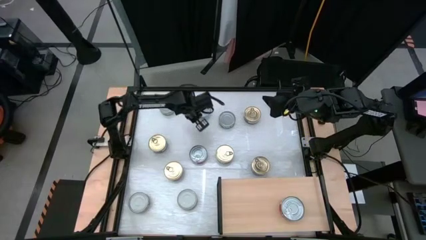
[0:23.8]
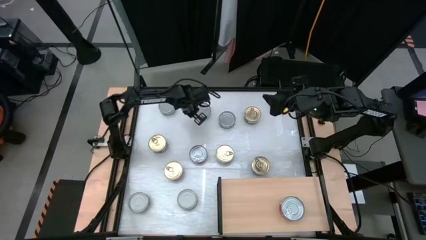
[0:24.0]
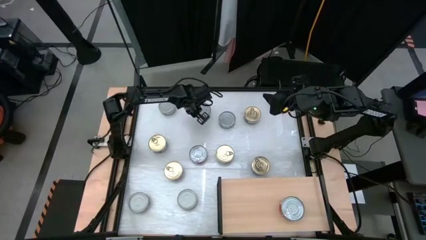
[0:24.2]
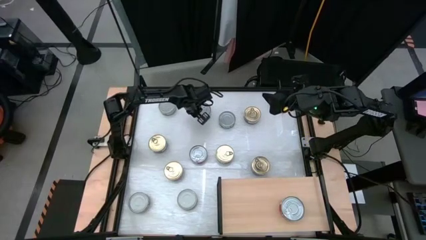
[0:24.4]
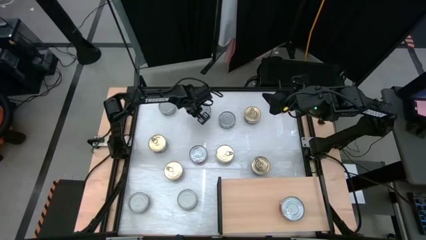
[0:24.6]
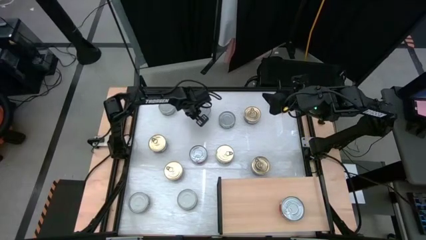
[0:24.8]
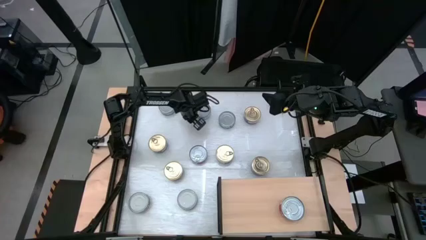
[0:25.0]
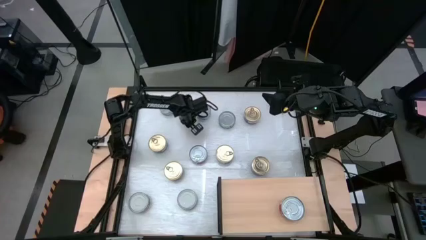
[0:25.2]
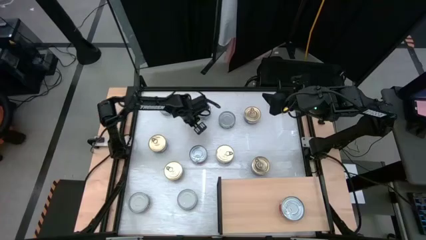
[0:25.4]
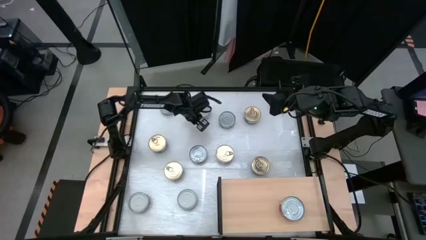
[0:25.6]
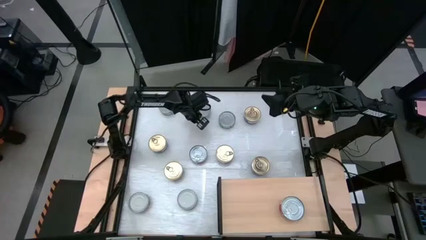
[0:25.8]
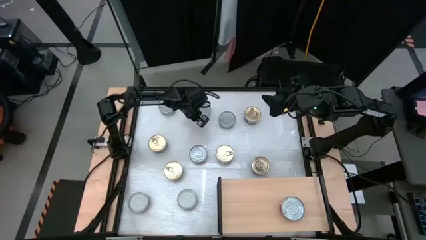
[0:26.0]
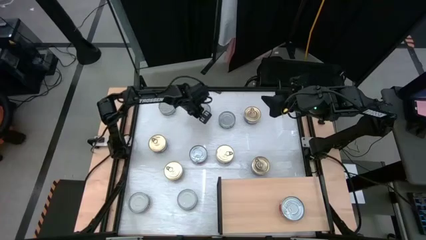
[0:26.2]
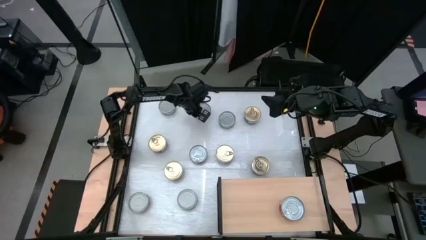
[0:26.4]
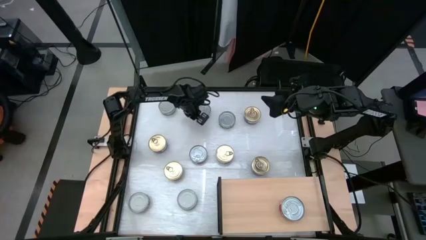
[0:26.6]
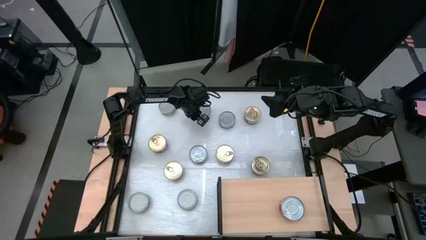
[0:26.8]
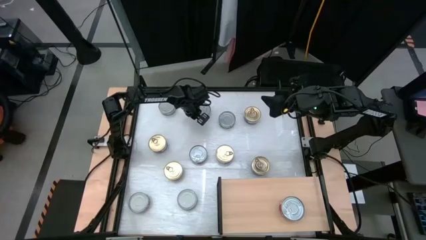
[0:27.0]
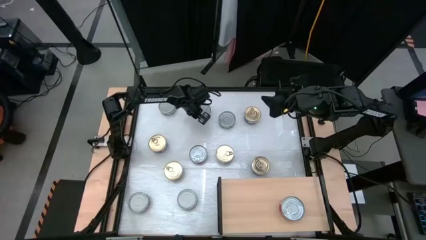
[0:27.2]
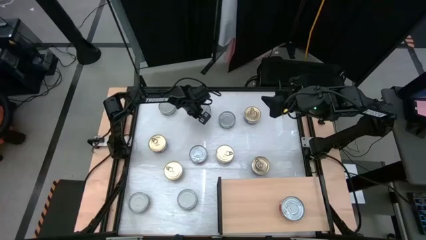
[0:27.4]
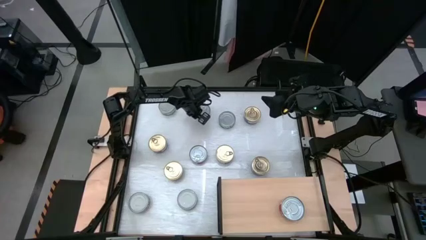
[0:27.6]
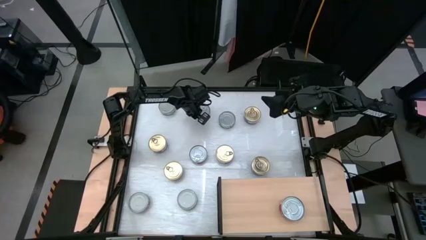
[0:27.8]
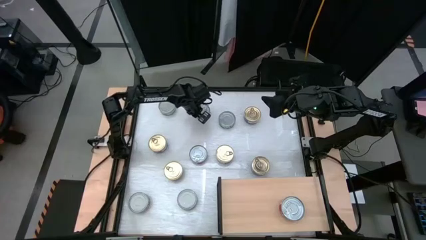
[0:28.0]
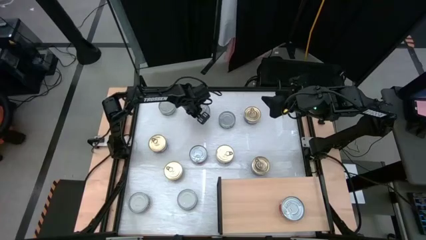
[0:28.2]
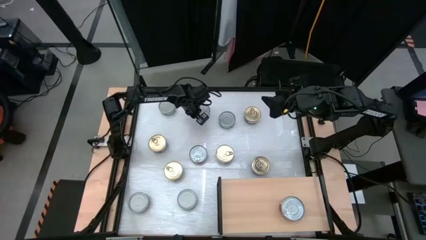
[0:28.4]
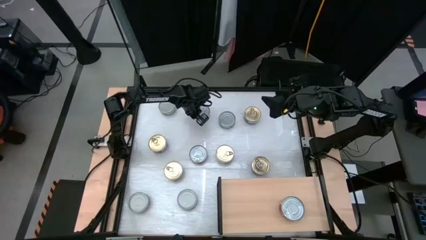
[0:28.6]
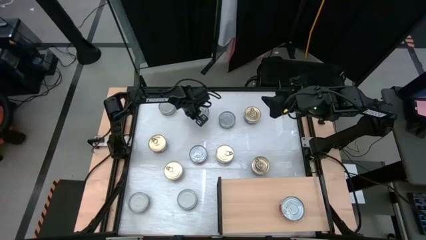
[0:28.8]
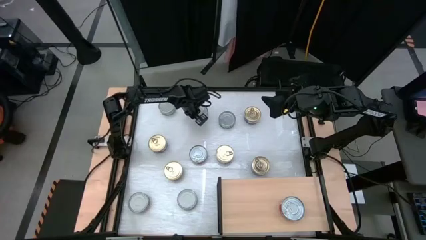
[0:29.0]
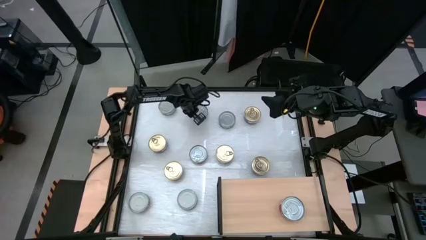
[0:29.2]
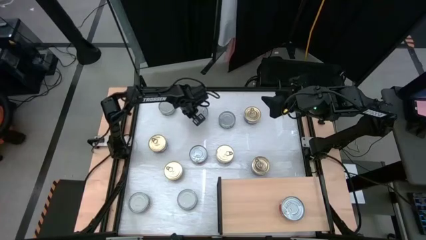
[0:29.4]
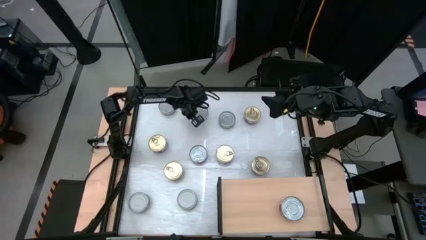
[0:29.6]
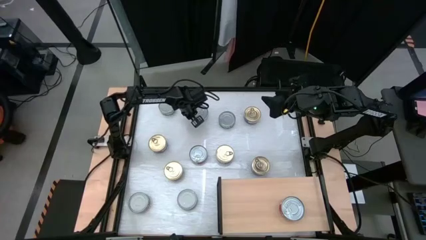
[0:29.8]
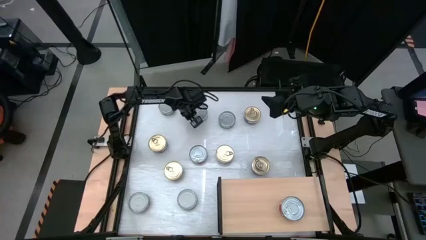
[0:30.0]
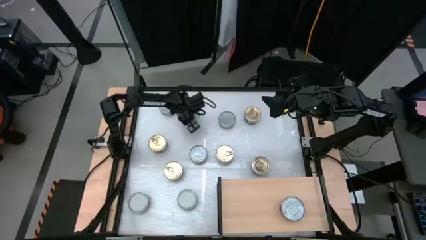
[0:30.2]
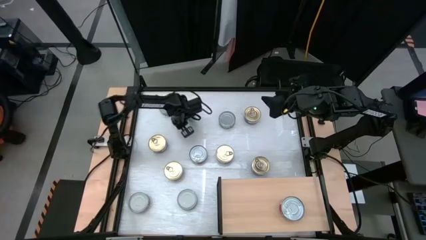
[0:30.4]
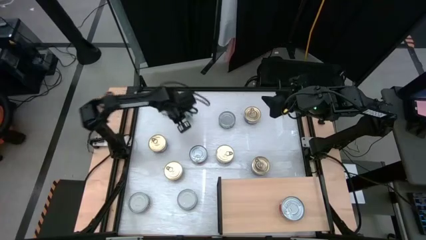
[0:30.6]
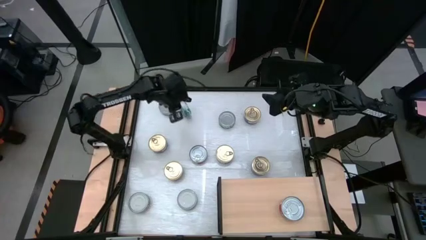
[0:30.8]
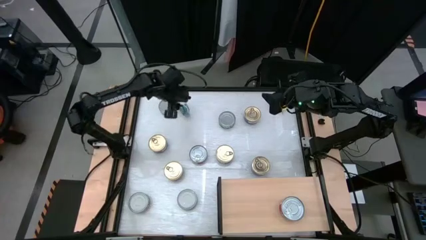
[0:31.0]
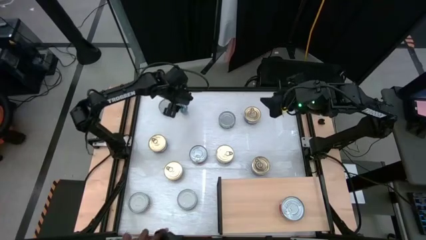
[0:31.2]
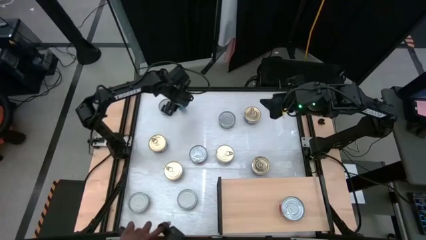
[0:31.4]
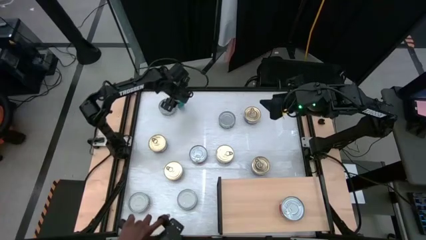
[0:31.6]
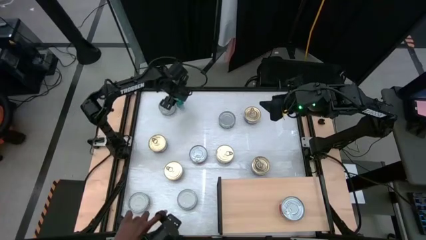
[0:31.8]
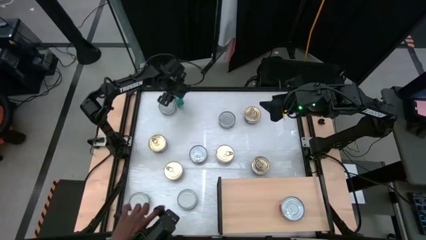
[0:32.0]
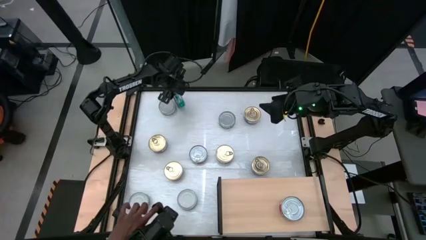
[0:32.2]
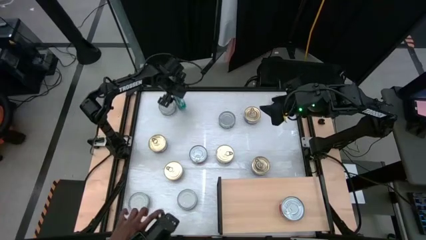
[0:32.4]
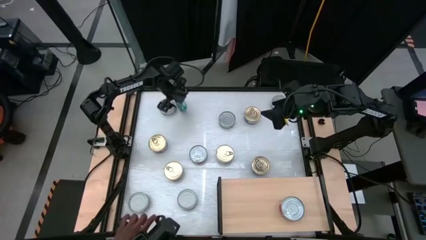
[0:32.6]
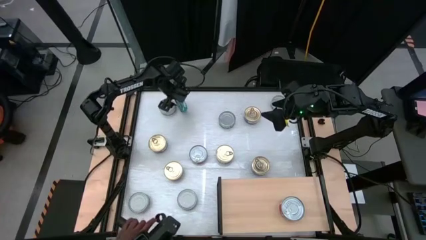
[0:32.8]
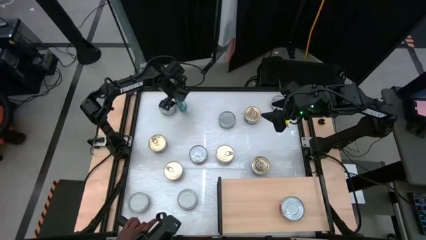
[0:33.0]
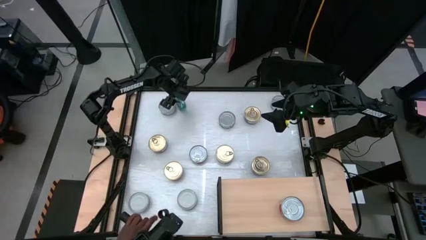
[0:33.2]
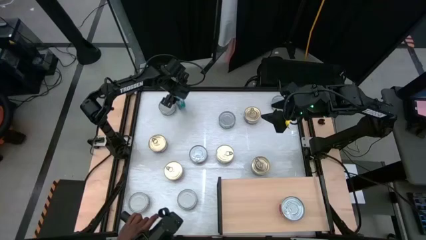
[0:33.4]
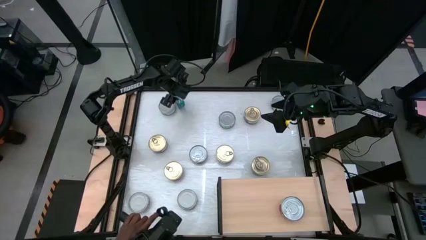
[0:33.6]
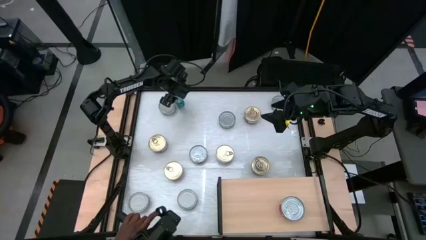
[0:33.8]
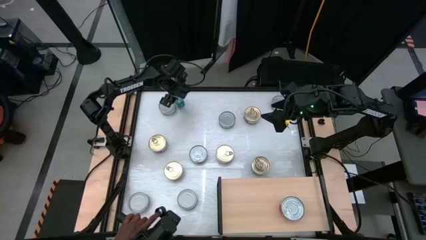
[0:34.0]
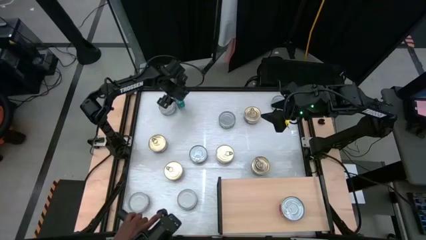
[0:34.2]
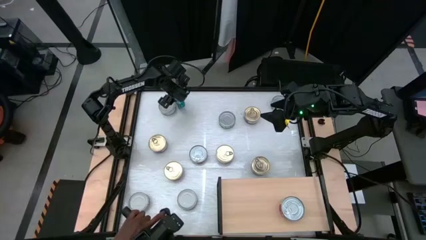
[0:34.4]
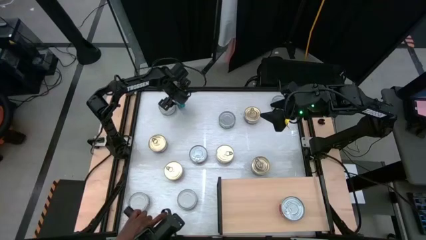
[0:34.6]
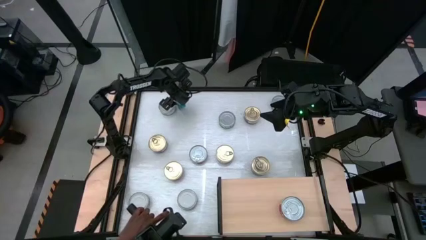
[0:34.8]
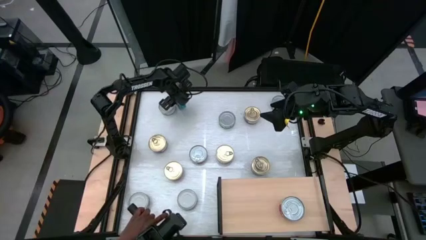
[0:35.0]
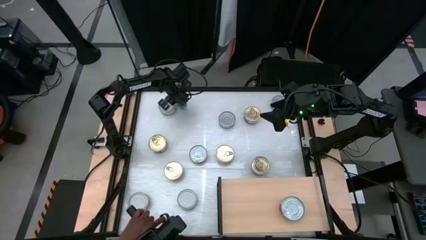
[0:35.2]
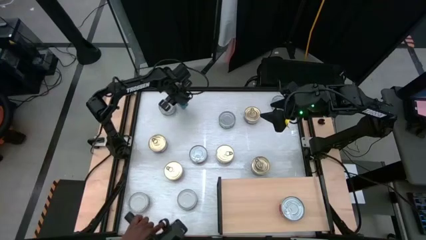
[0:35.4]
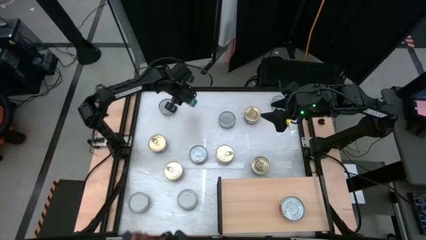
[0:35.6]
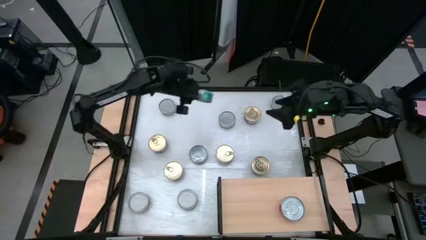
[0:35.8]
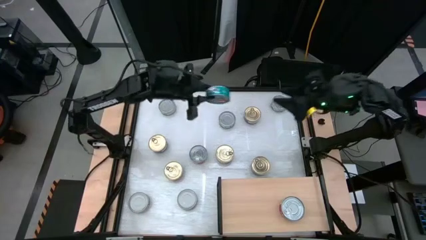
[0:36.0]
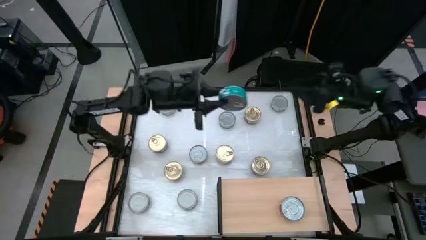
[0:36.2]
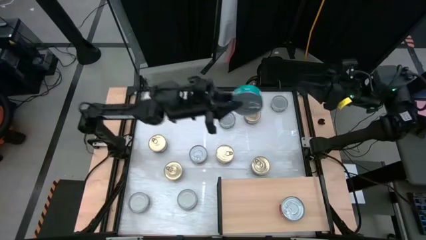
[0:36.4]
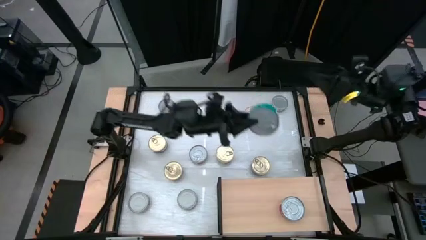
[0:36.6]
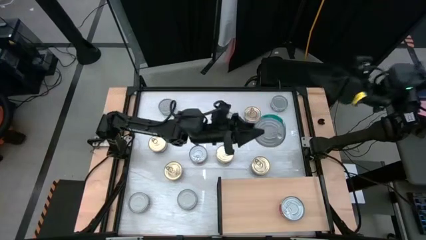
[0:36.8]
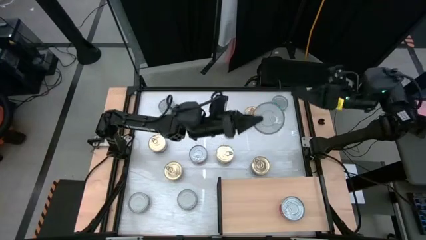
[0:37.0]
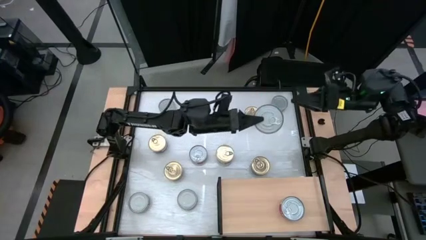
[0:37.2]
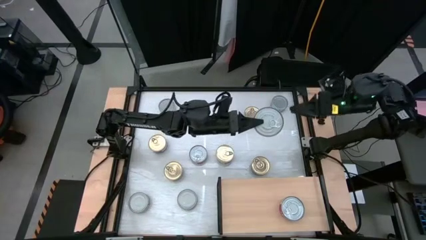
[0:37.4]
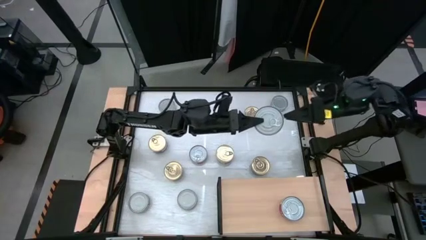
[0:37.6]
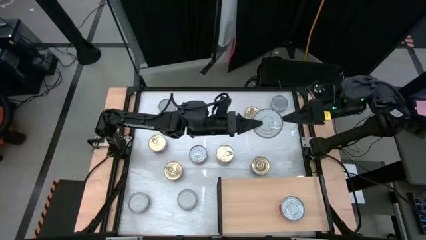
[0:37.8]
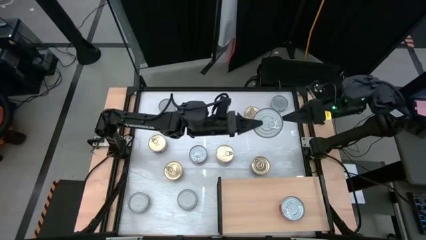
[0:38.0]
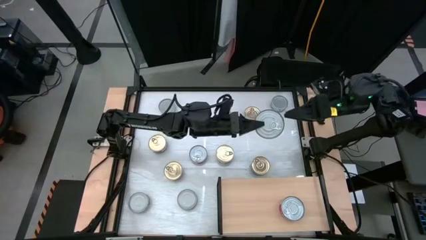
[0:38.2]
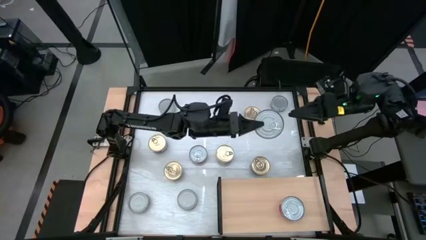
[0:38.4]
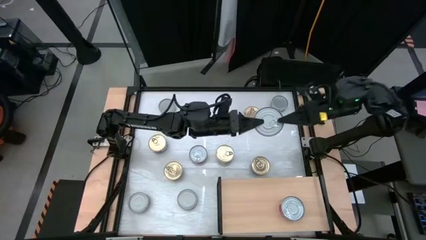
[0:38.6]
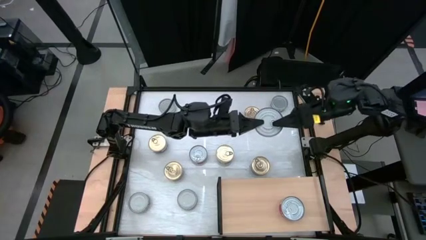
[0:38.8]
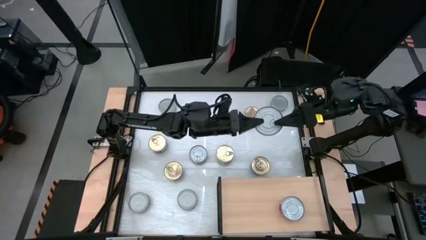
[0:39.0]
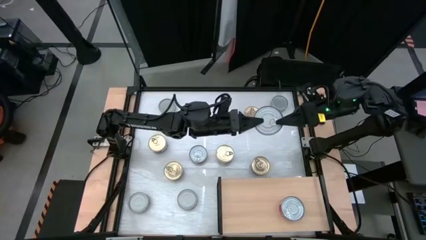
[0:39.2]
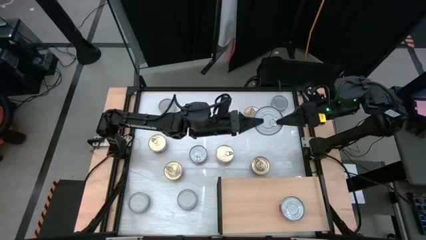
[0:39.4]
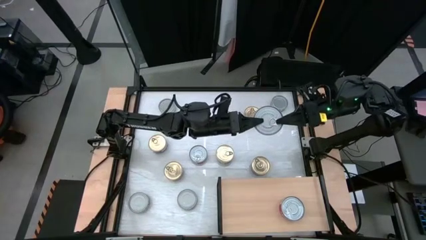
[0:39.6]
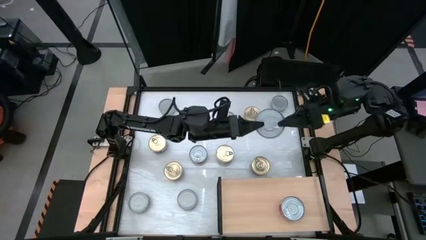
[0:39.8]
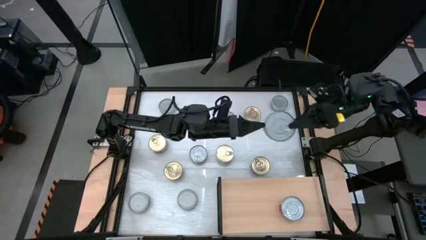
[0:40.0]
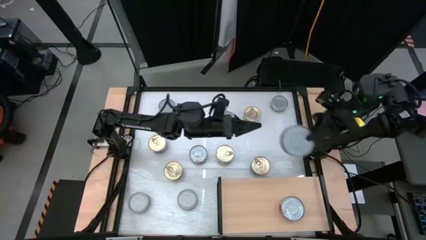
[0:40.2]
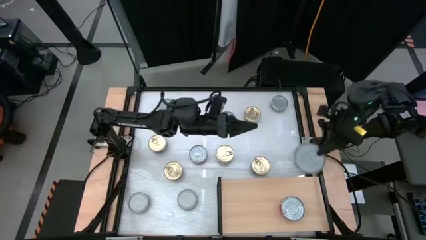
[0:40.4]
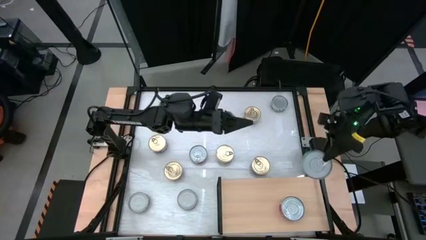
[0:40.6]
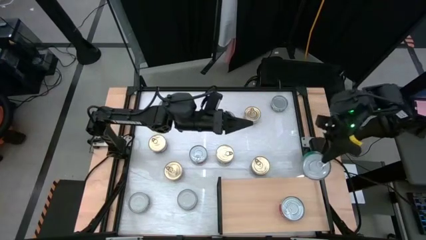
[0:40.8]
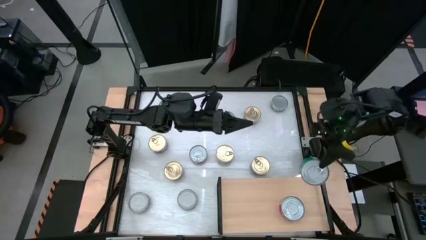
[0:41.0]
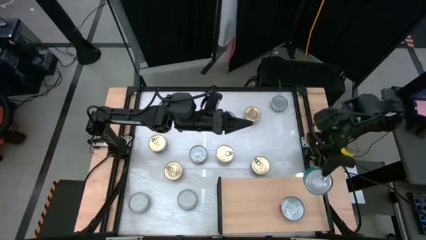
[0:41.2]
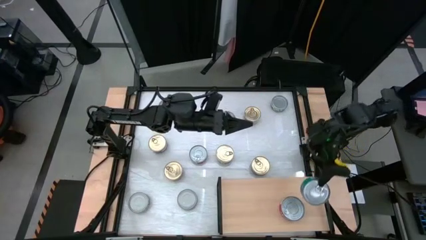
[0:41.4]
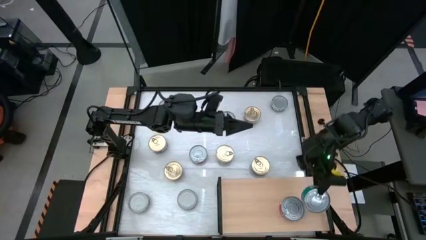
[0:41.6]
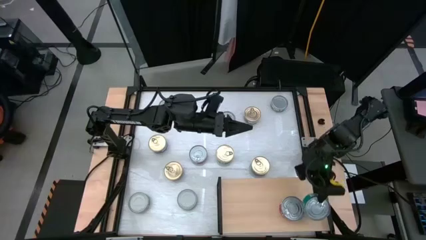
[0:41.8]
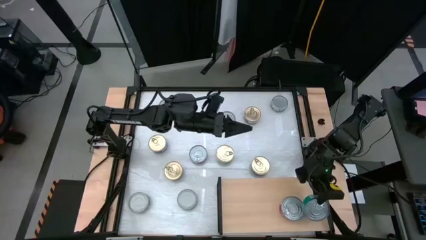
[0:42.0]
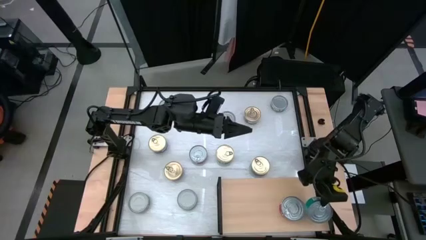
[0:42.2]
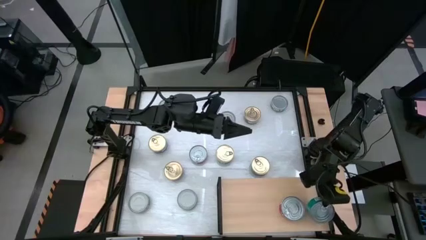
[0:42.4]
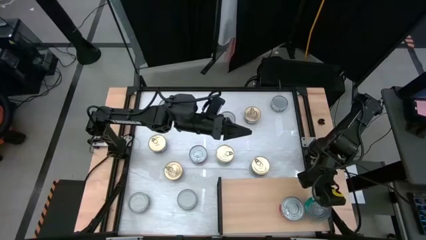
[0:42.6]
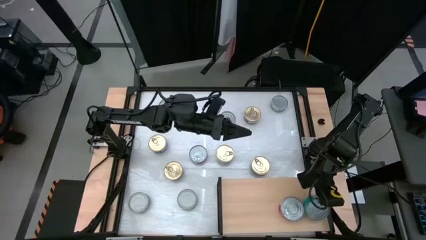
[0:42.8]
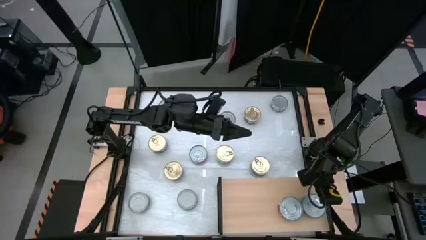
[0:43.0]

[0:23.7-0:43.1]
Task: Stack canned seafood by type on shelf
Put the green-blue tuna can on the shelf
